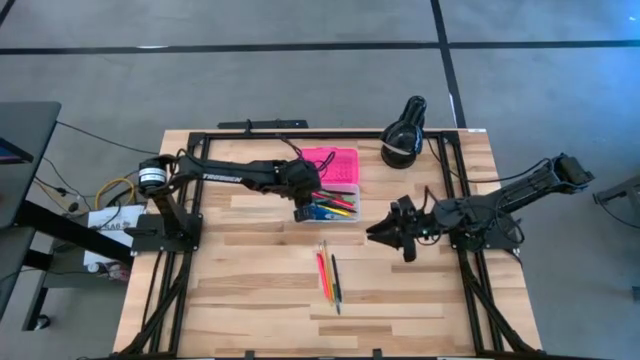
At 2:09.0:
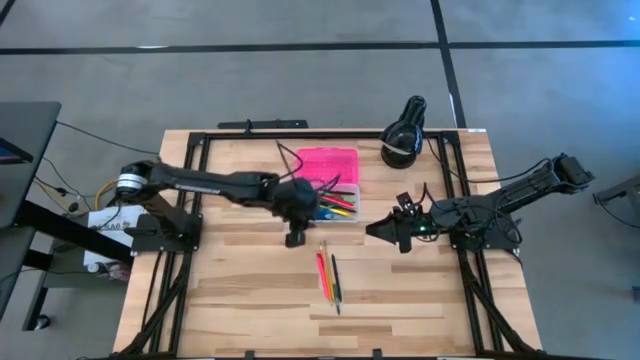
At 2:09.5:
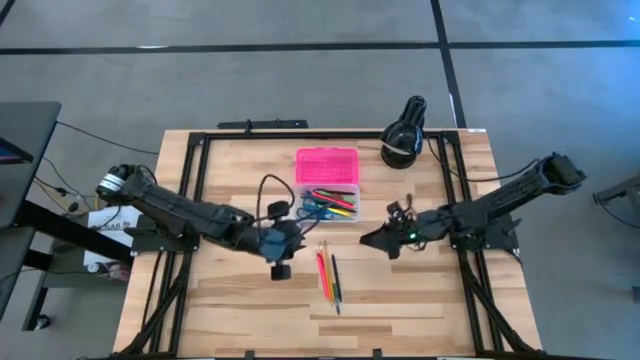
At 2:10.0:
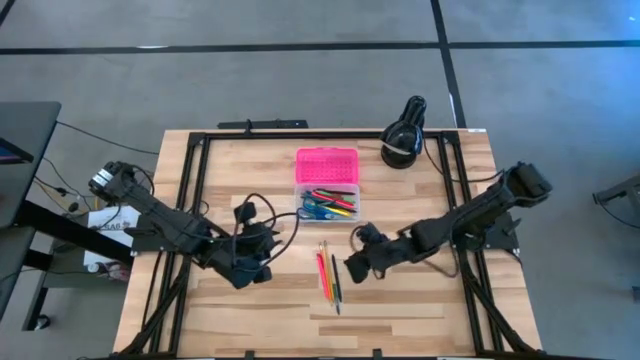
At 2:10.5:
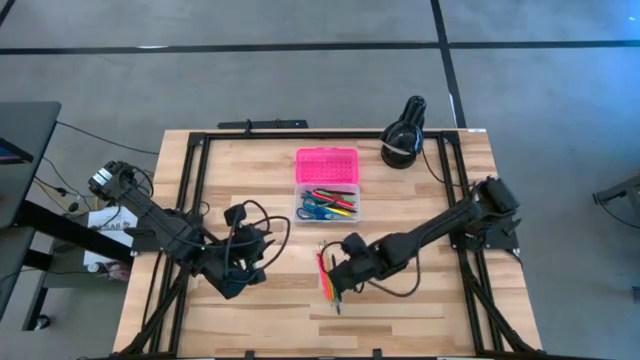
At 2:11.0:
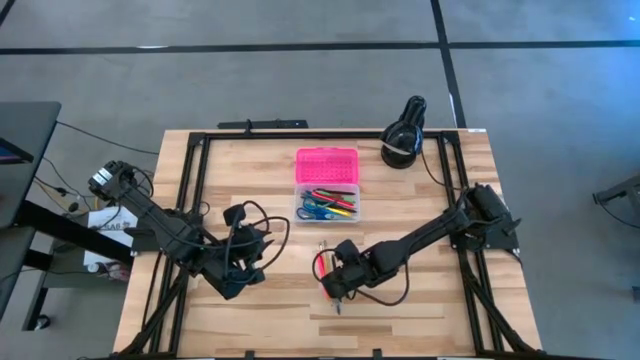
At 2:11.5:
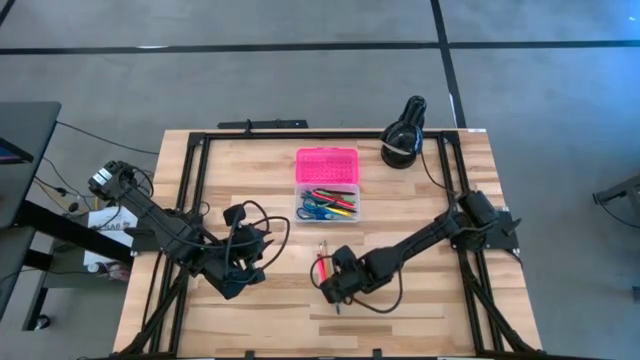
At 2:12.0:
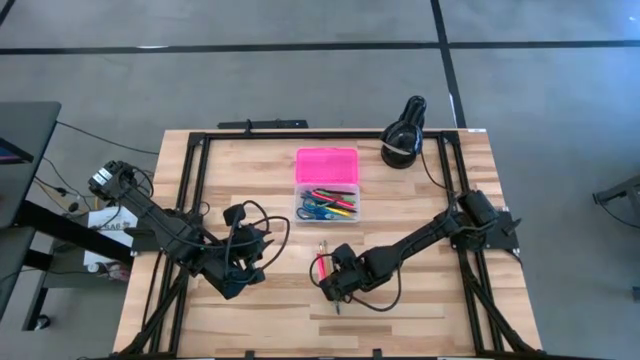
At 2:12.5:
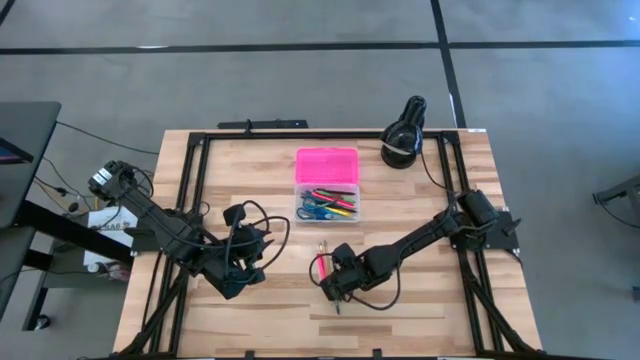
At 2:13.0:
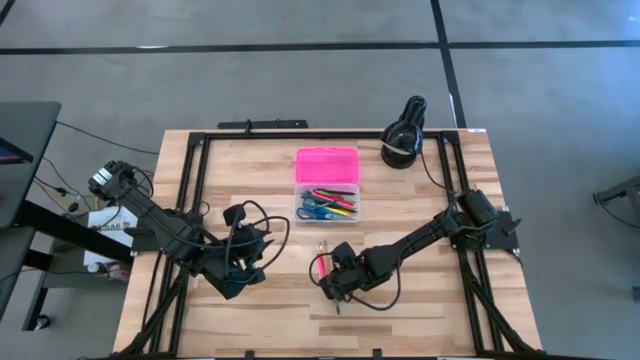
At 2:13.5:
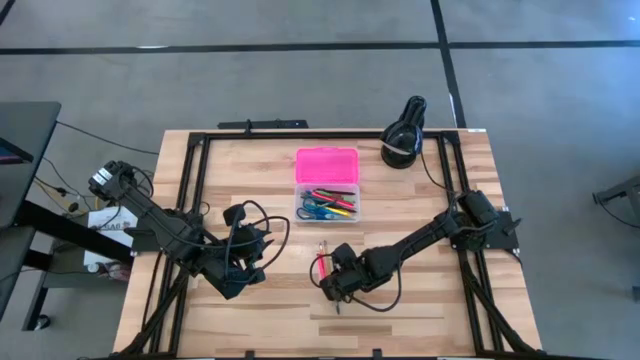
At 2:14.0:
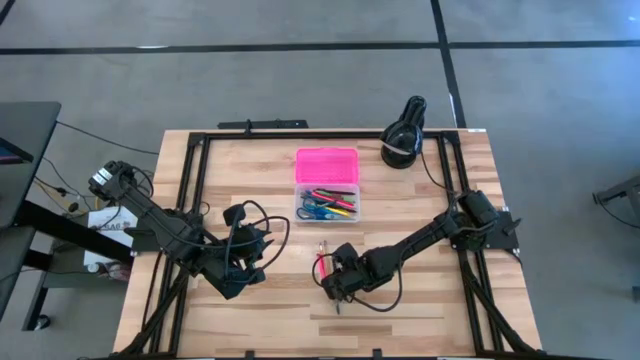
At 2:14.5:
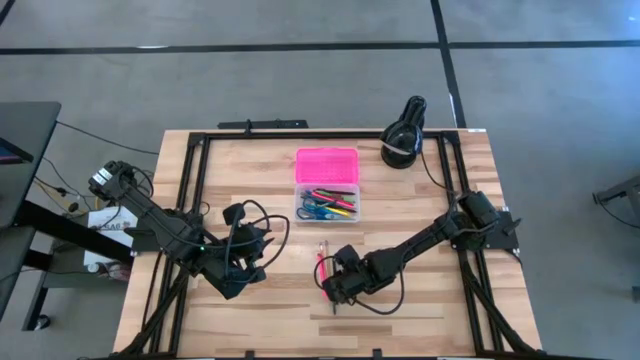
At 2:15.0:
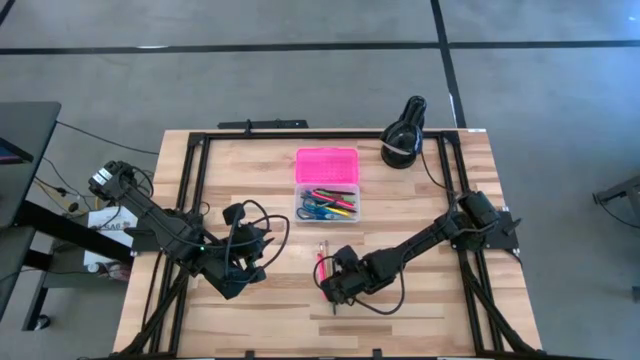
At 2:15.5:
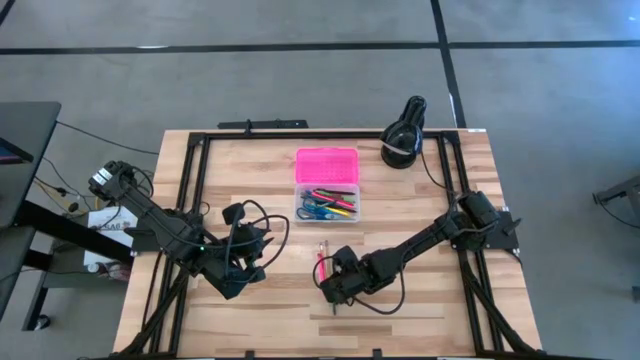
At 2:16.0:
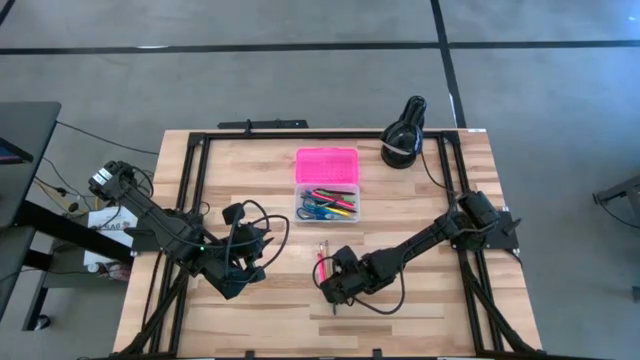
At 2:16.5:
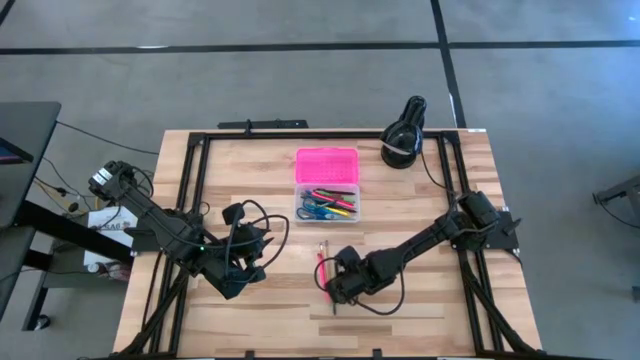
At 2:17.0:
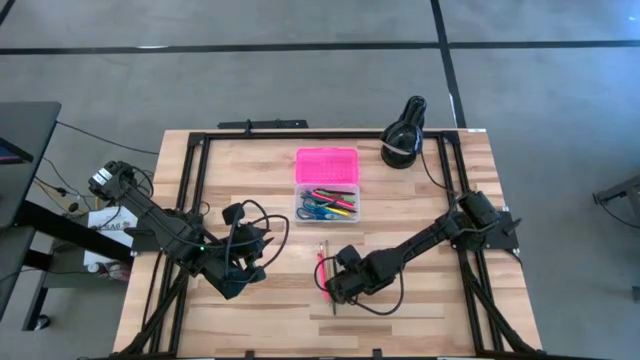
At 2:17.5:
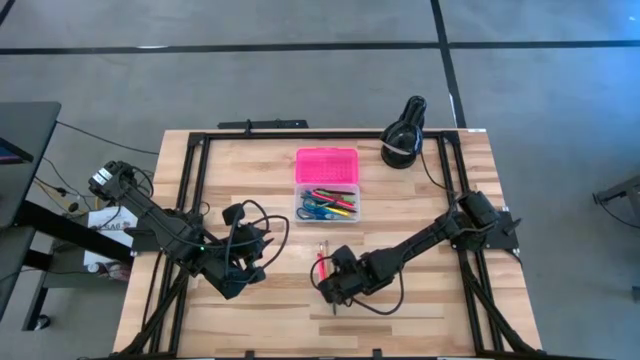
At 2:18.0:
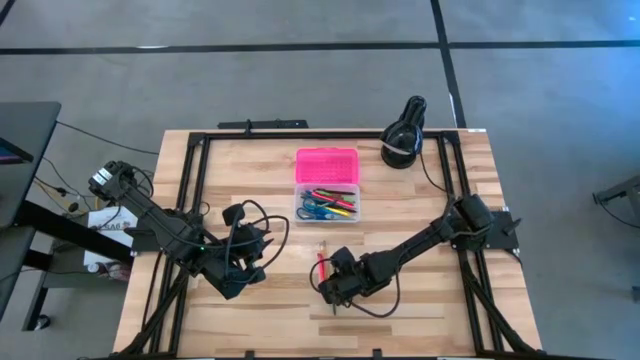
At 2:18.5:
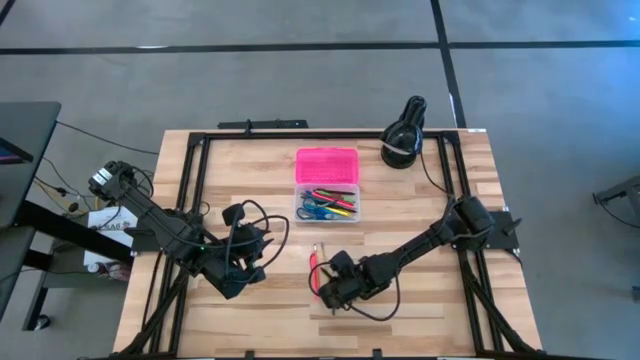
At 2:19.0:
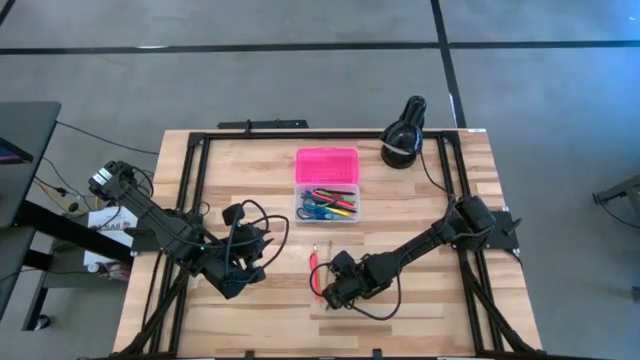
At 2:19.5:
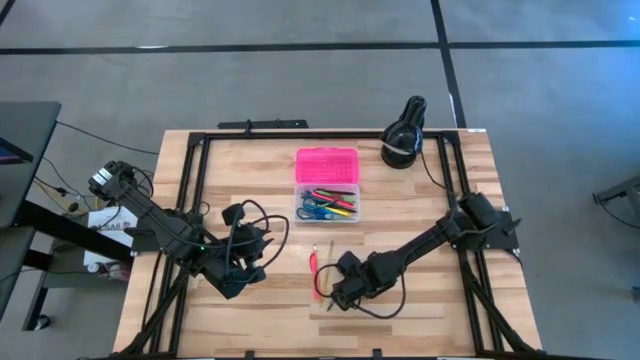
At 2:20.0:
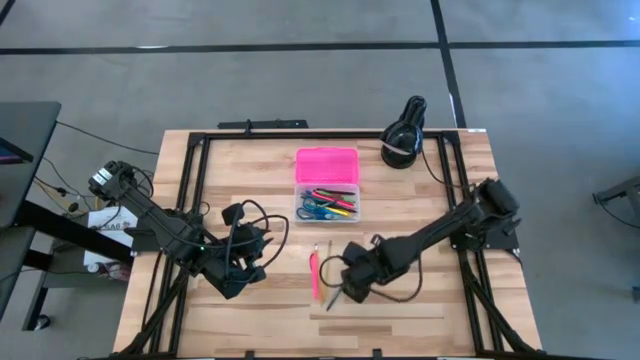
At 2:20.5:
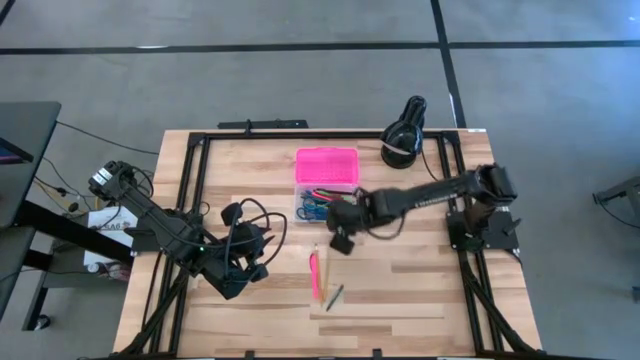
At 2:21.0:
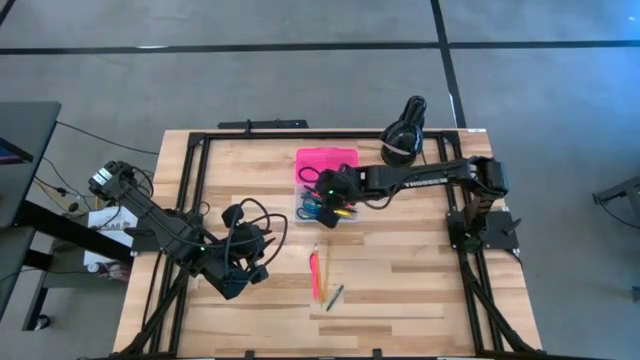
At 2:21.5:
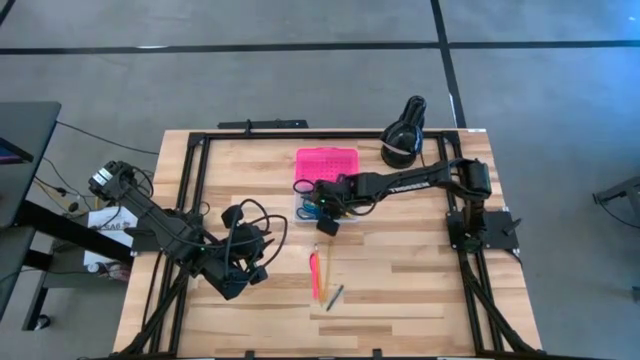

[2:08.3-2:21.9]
Task: Pick & place school supplies into a supply box
Put the black pen into the pink supply box

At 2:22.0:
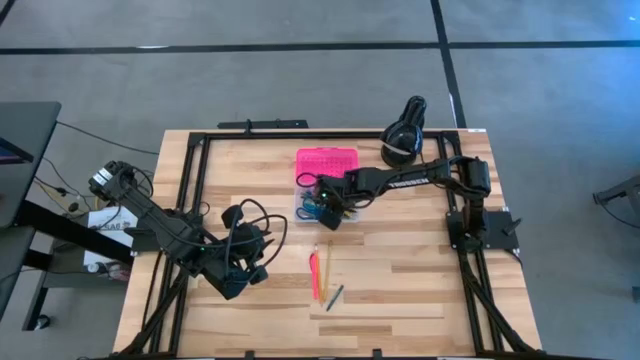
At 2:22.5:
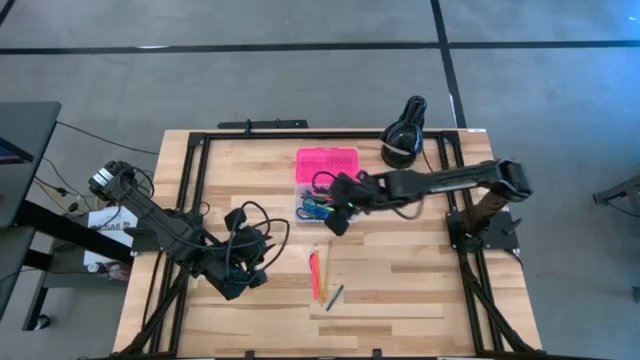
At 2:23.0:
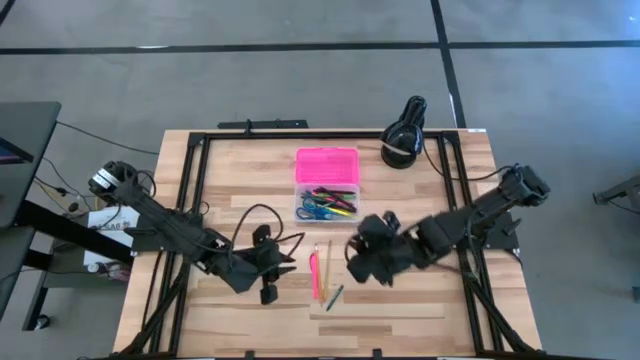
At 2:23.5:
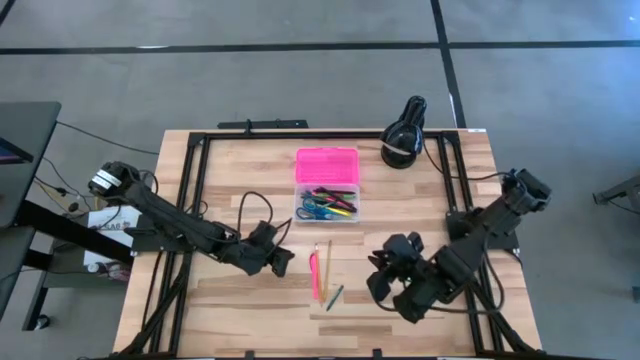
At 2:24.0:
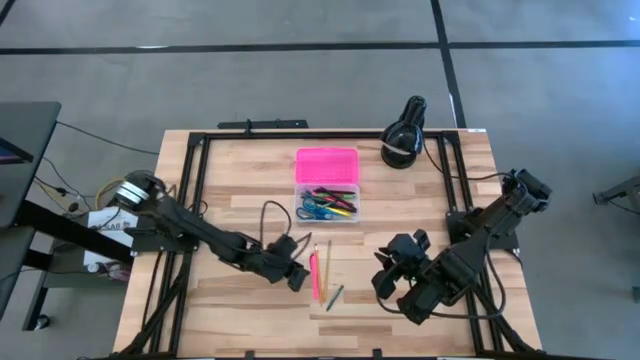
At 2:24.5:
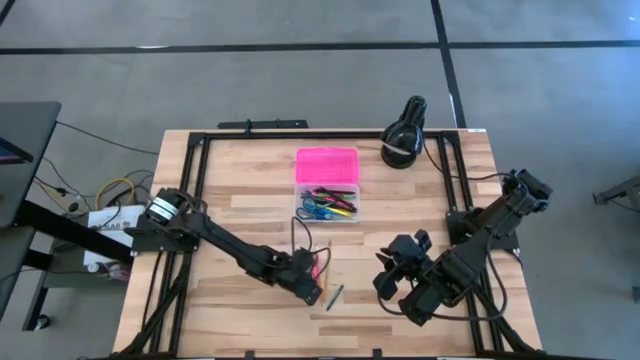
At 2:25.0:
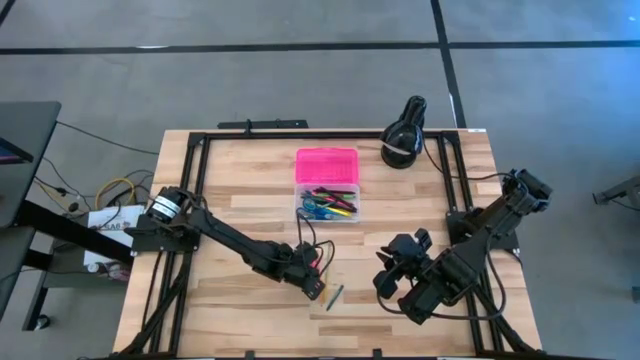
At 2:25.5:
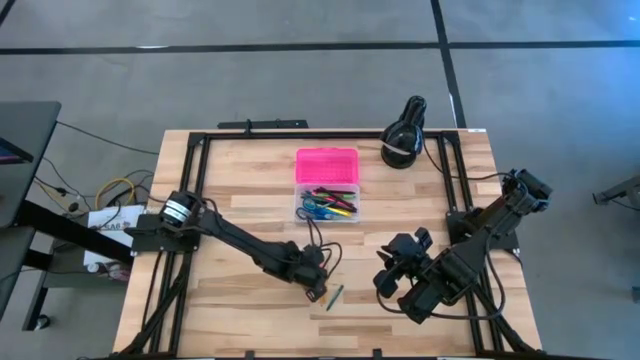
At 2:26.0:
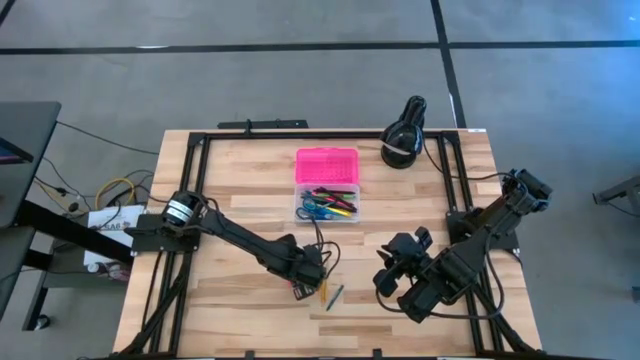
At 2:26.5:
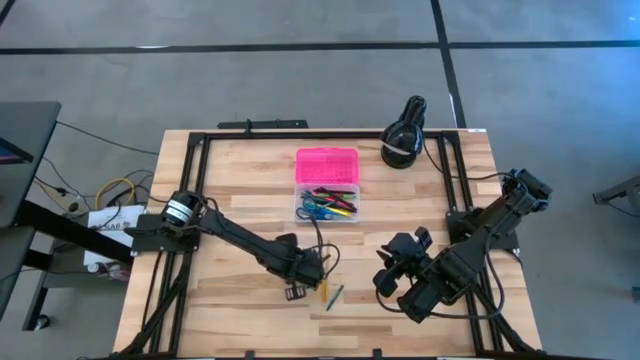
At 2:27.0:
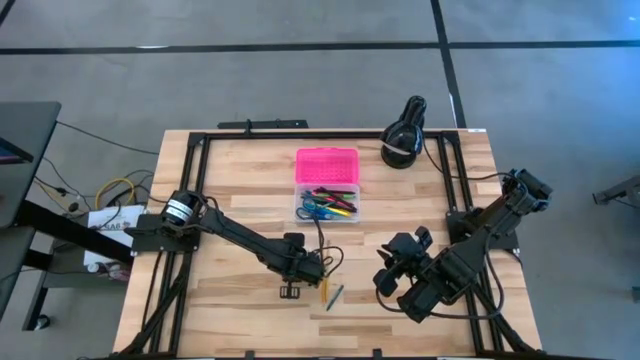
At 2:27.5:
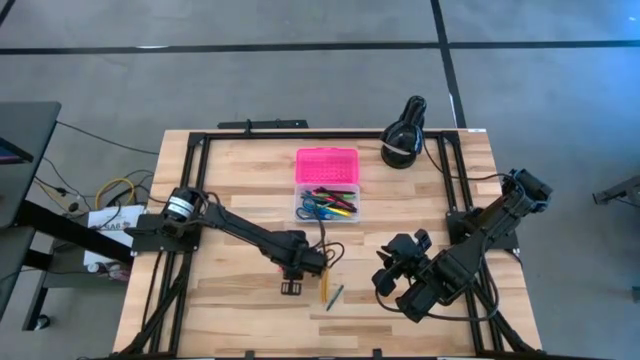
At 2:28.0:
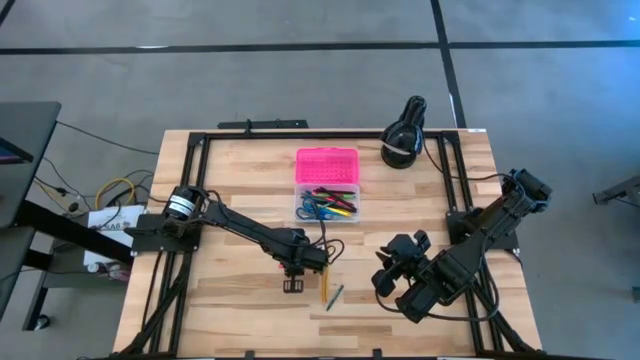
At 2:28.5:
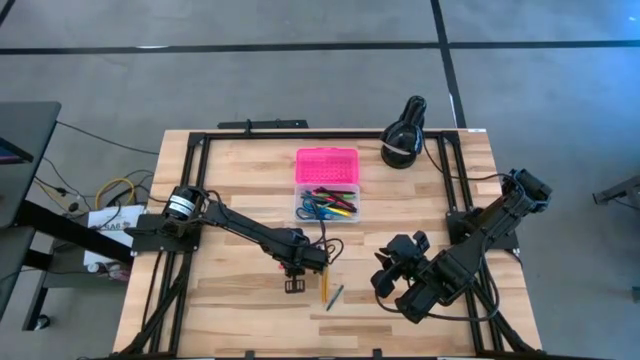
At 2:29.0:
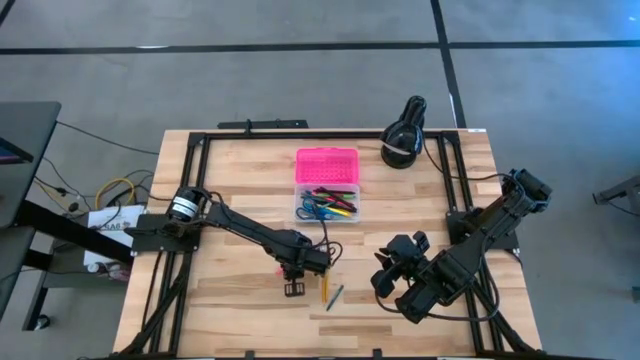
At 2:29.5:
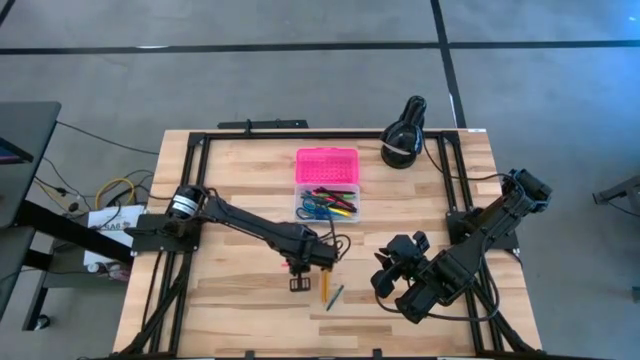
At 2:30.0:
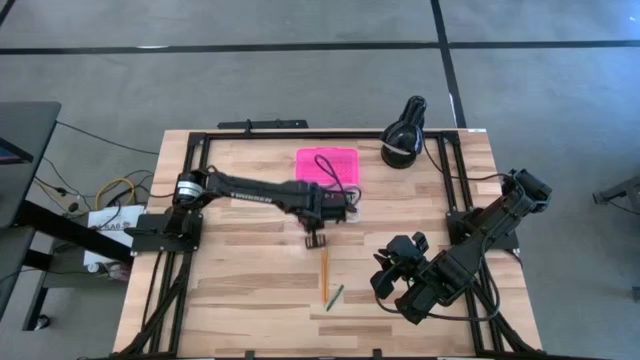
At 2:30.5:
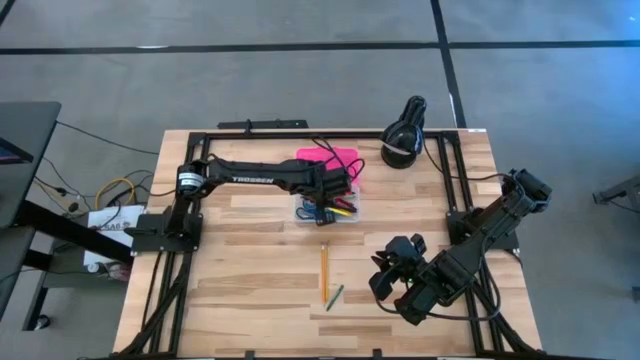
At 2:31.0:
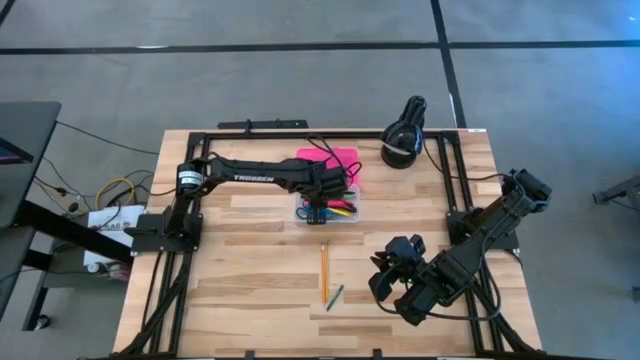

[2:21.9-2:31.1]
Put the pink pen into the pink supply box
